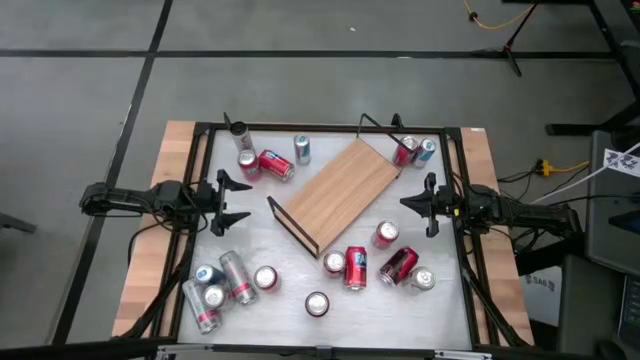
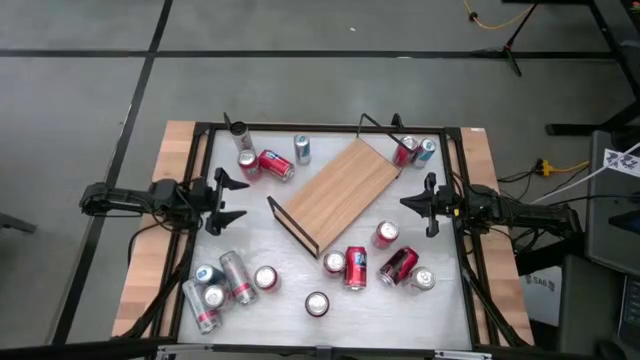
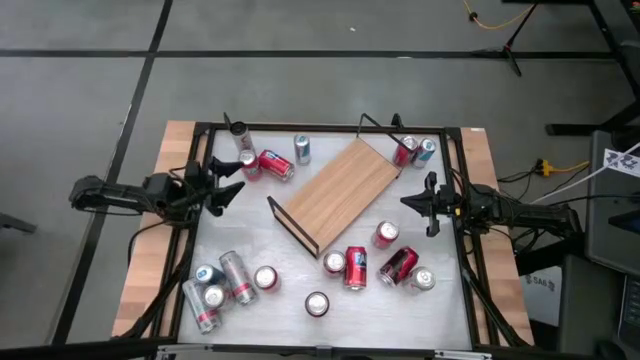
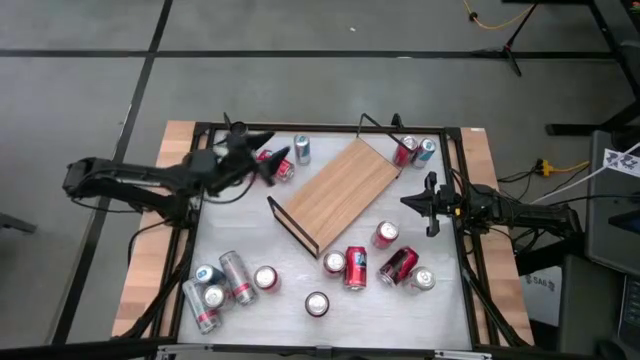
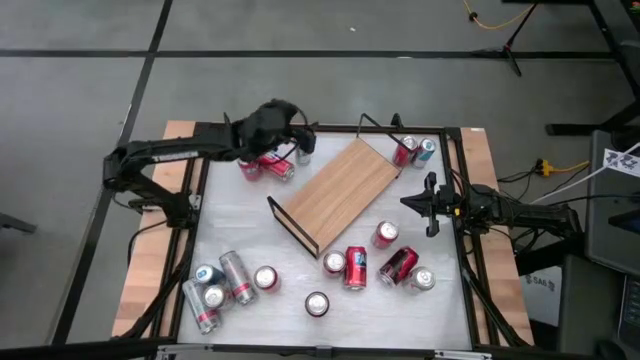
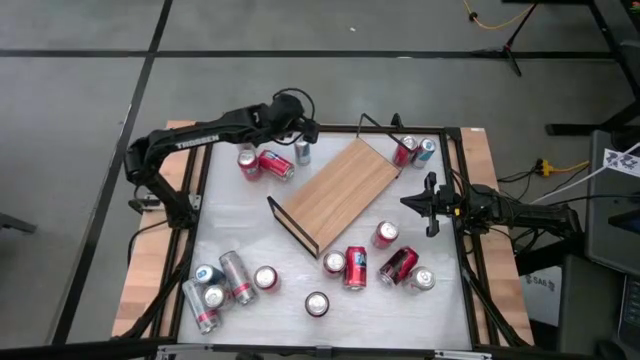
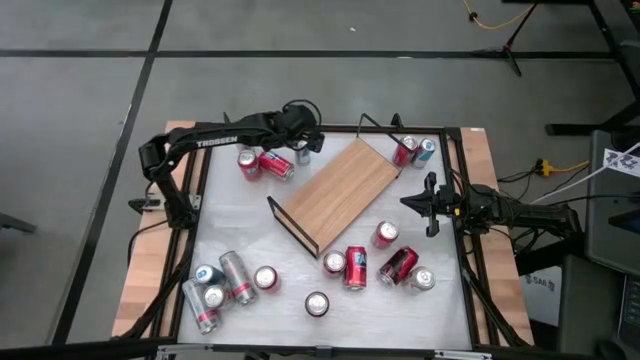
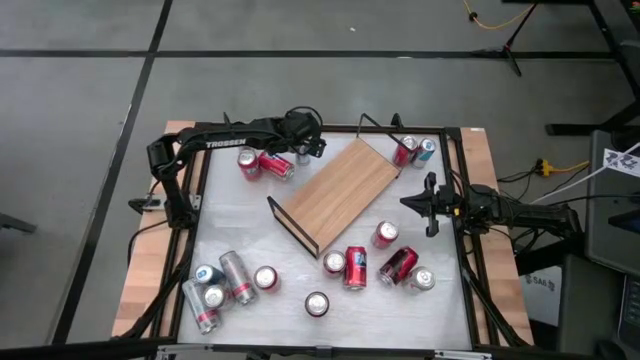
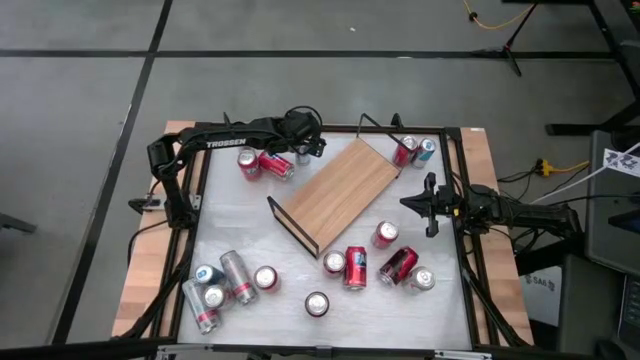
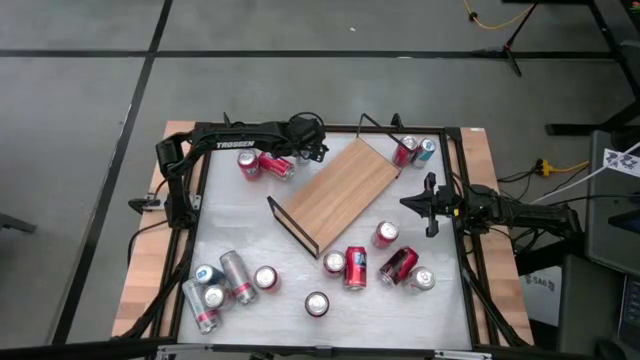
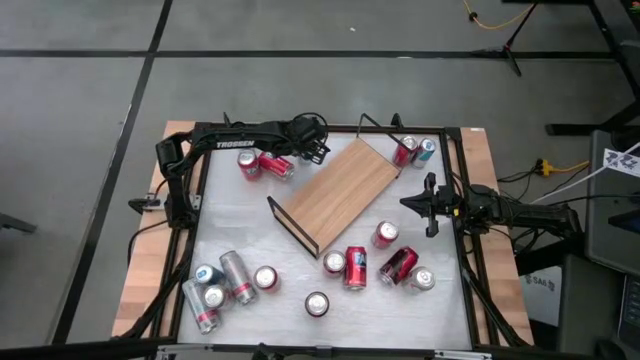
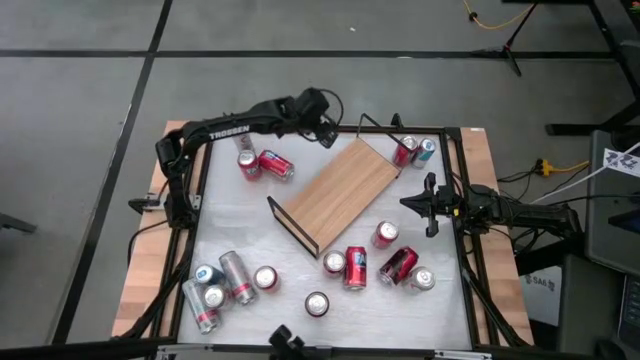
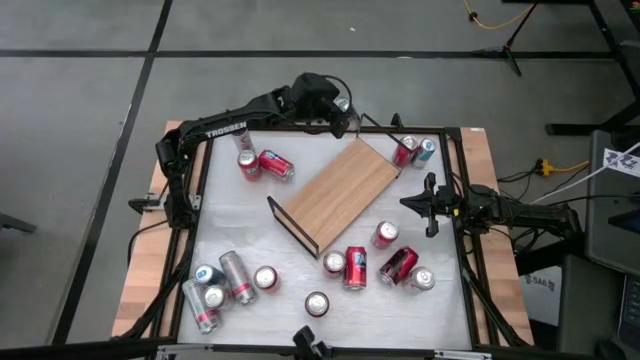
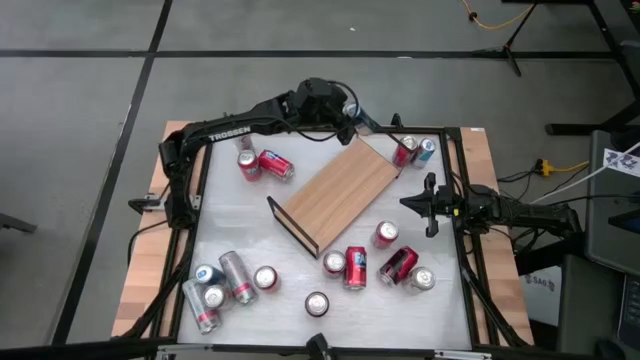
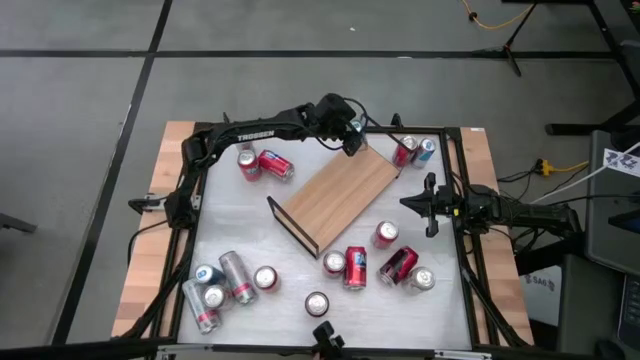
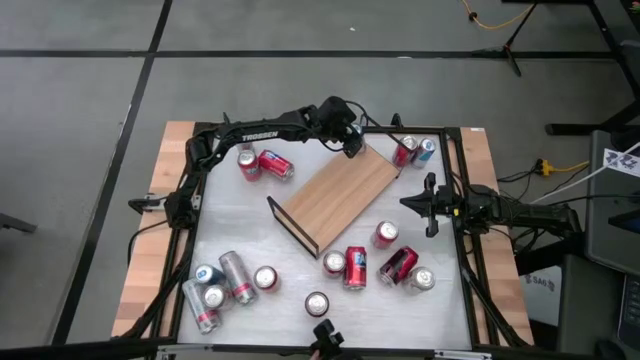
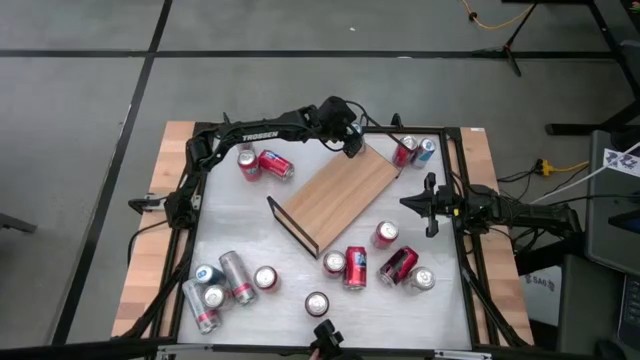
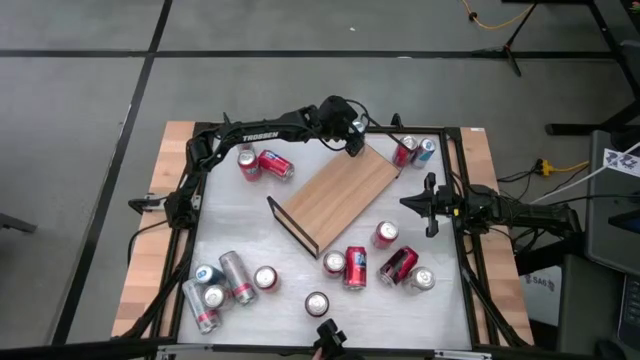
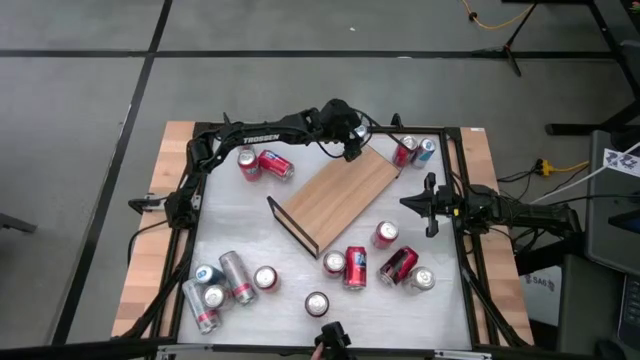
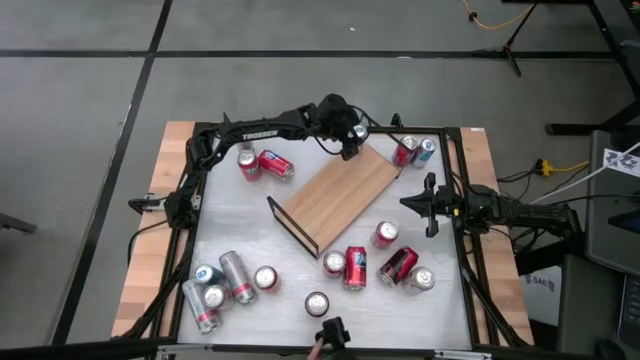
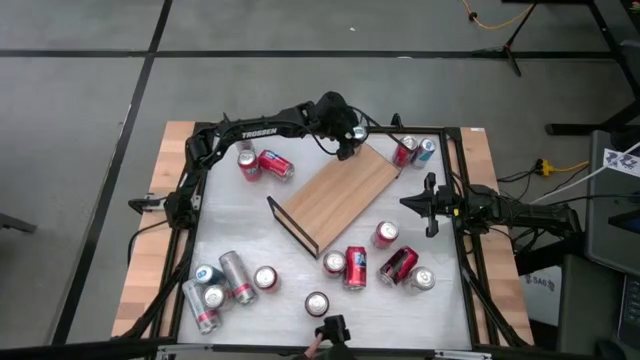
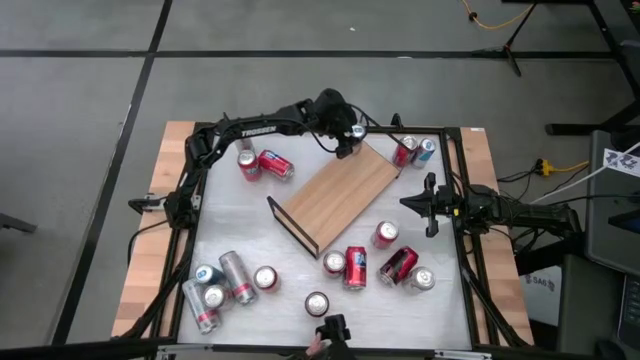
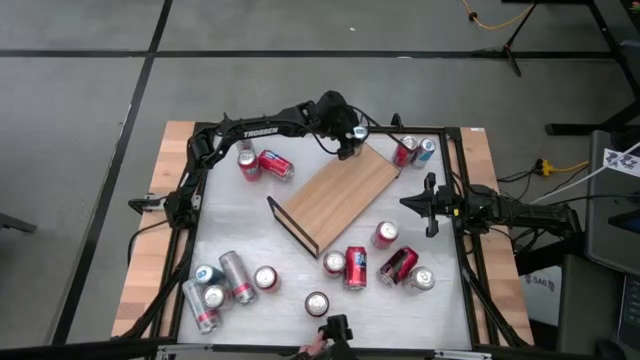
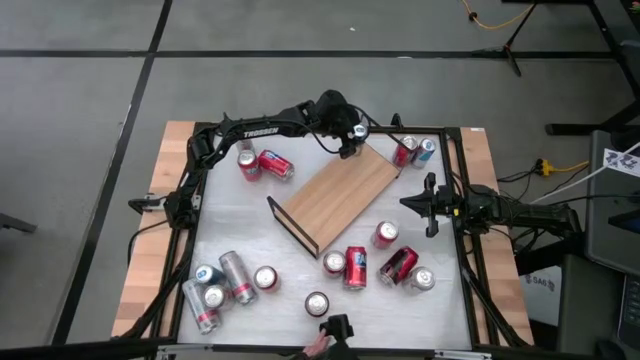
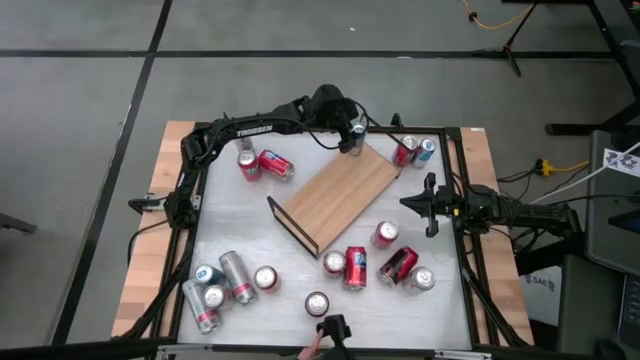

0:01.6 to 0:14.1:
Task: Place canned beverage on shelf
Put the blue soda can on the shelf

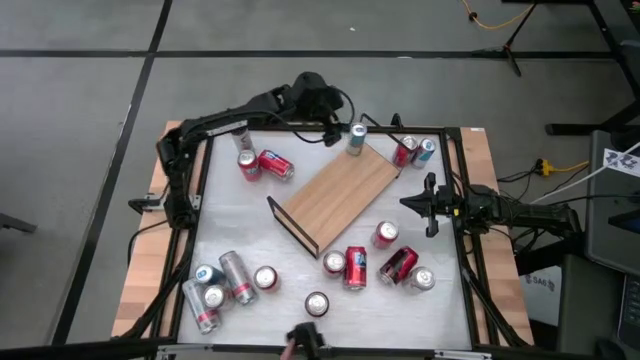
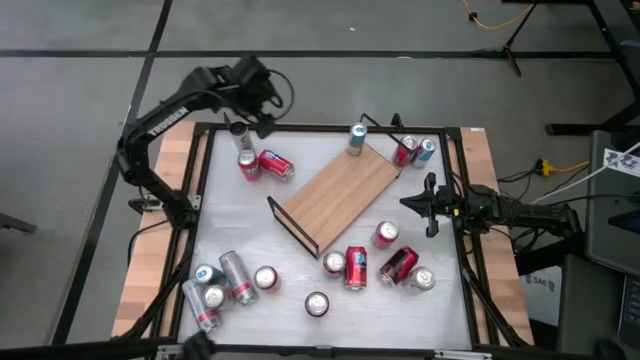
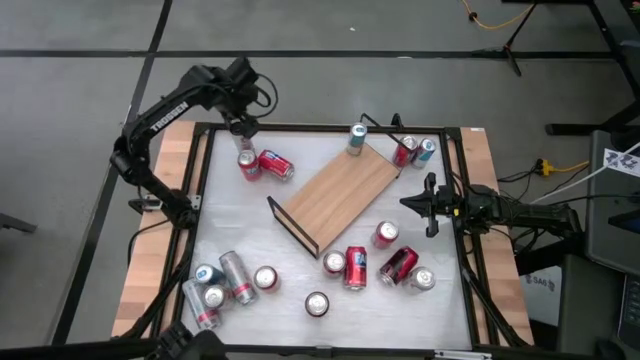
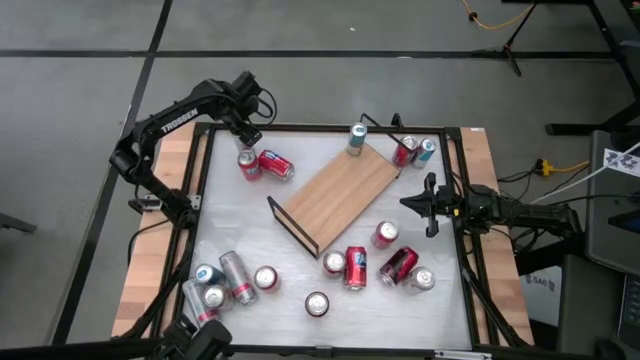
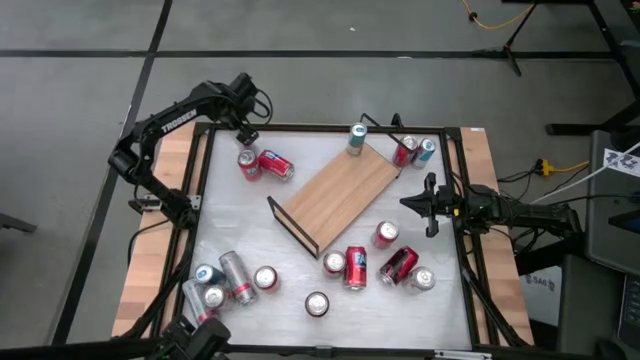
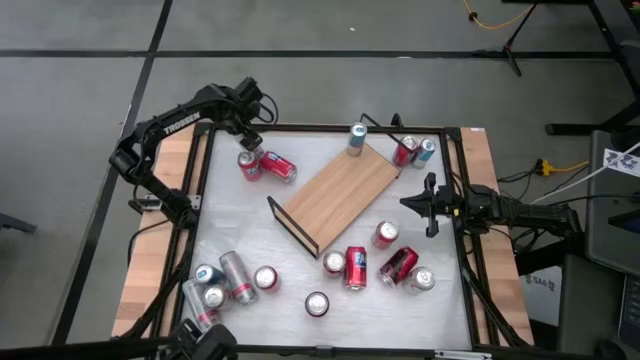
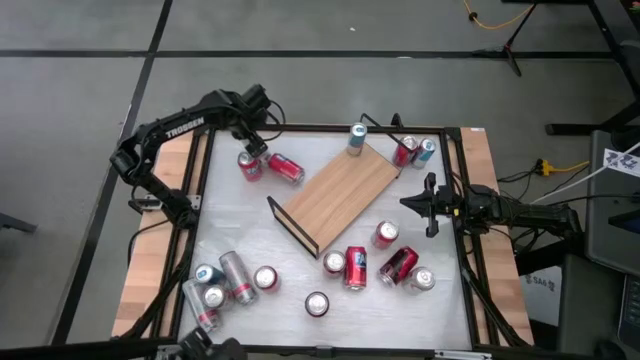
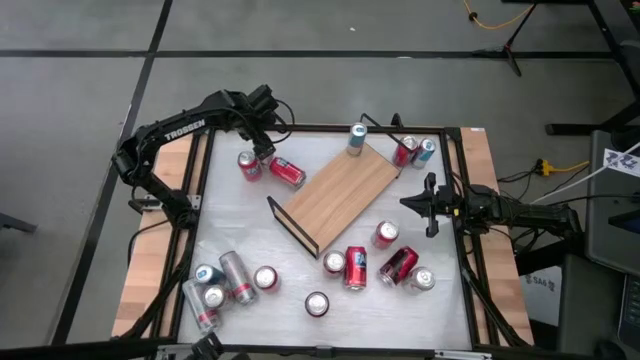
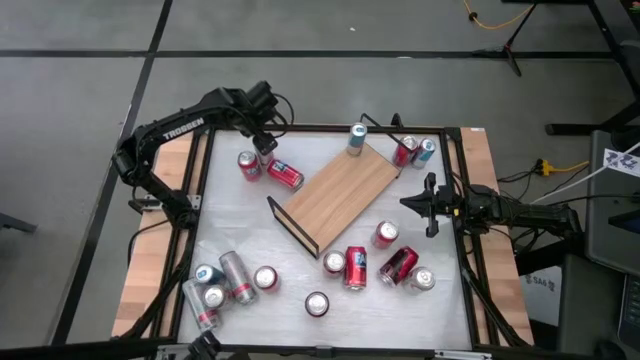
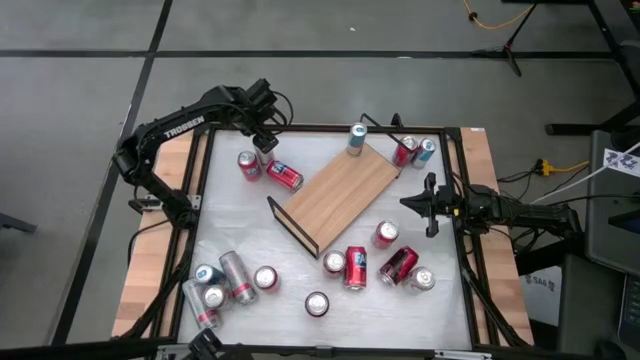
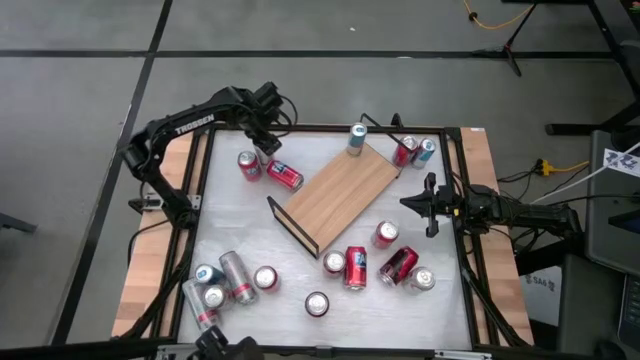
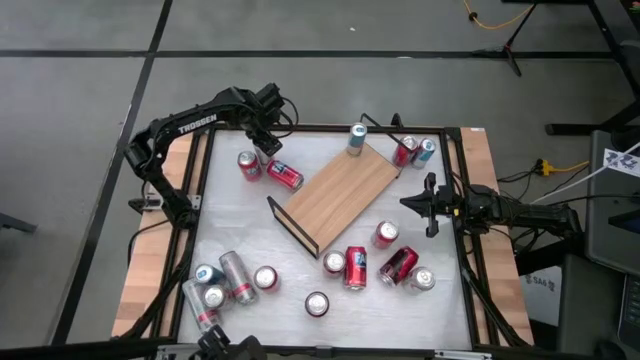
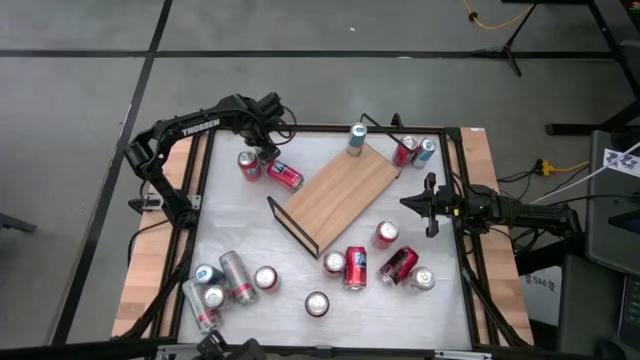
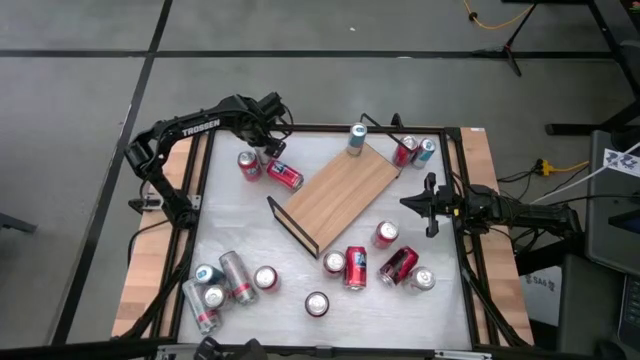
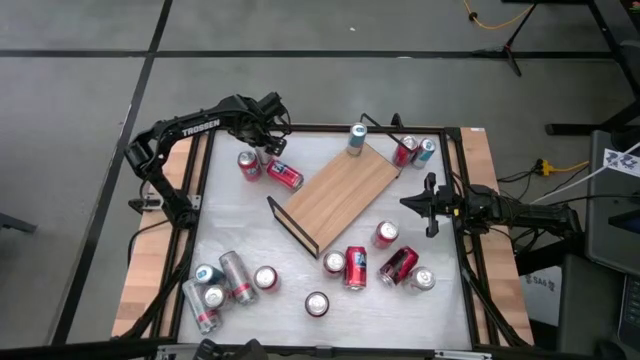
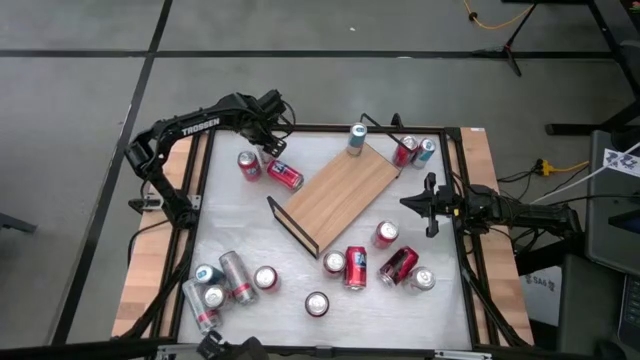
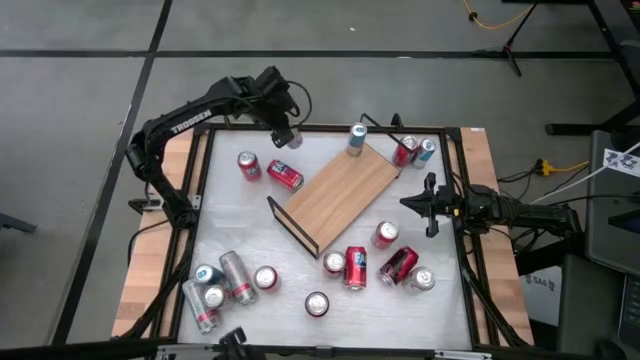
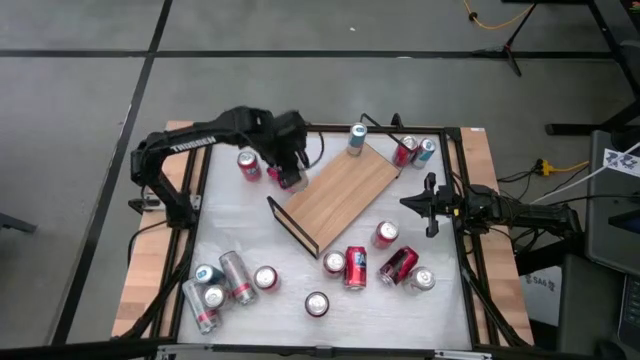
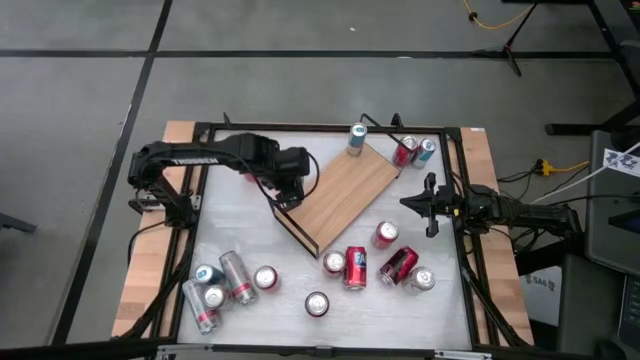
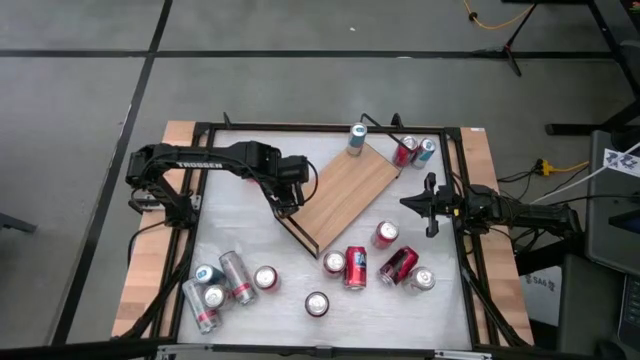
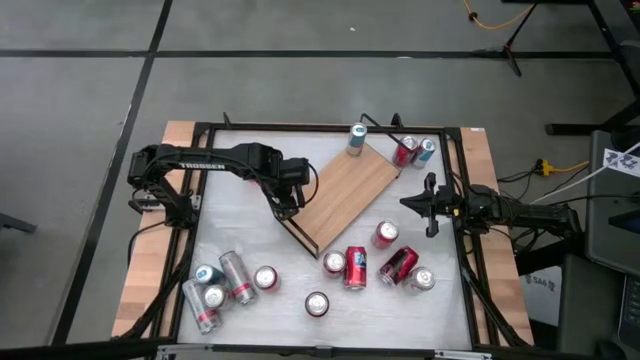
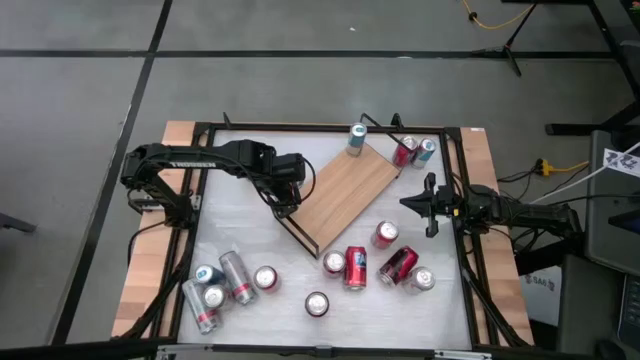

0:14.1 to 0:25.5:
Put the white pink soda can on the shelf
